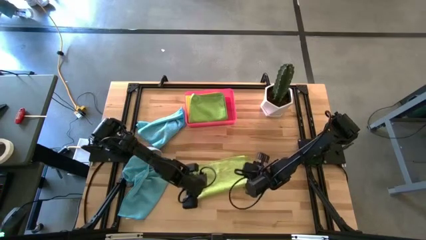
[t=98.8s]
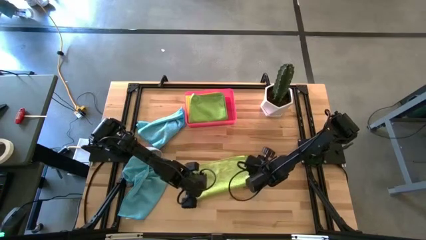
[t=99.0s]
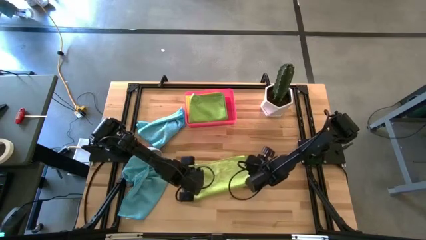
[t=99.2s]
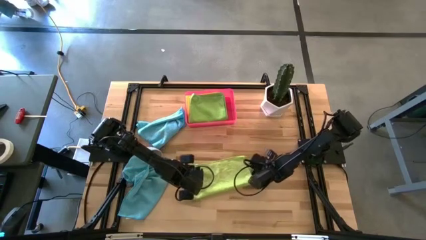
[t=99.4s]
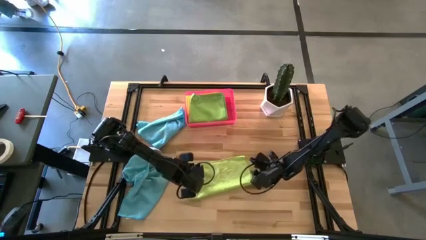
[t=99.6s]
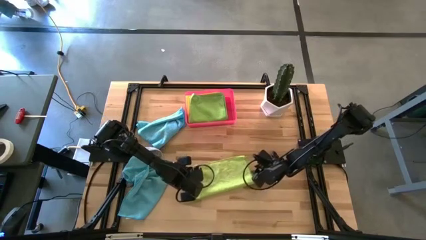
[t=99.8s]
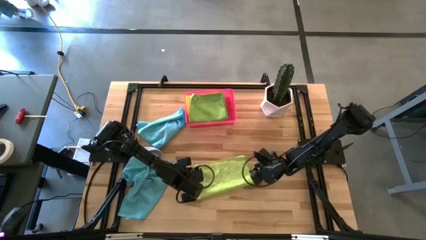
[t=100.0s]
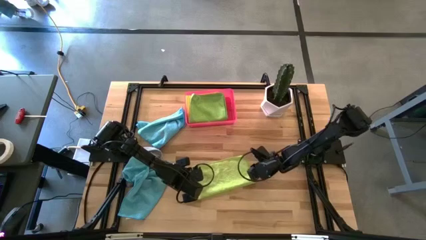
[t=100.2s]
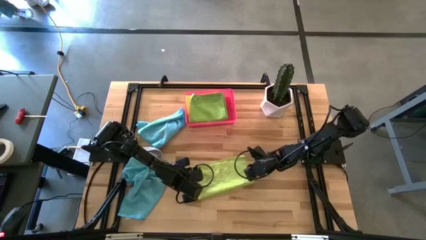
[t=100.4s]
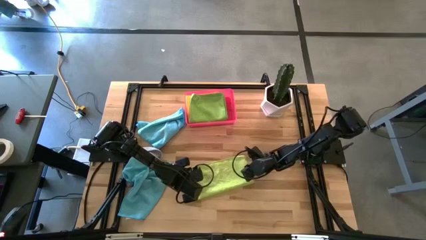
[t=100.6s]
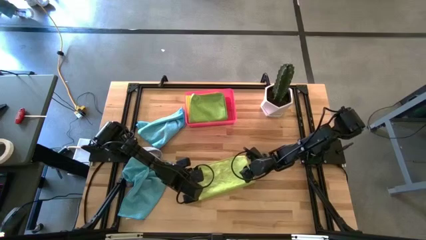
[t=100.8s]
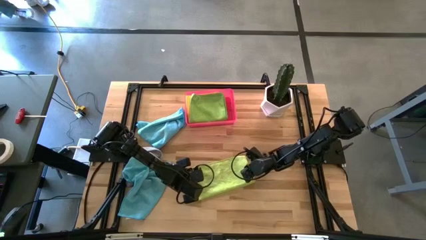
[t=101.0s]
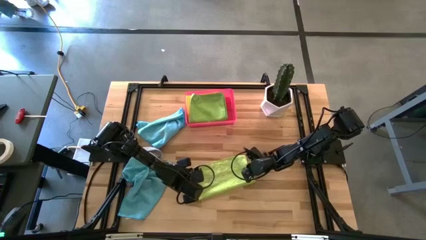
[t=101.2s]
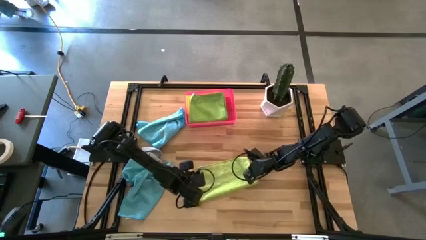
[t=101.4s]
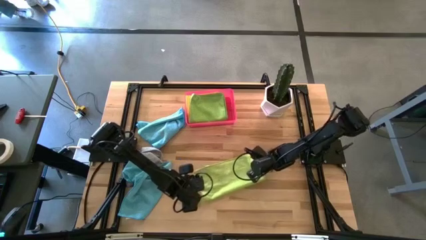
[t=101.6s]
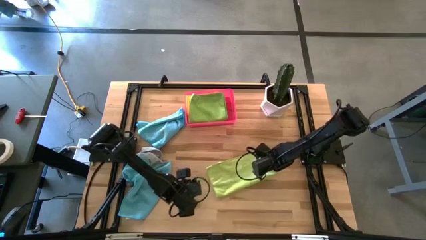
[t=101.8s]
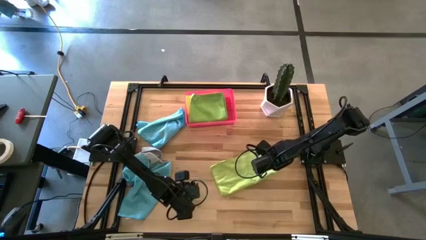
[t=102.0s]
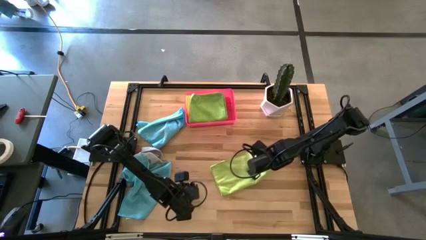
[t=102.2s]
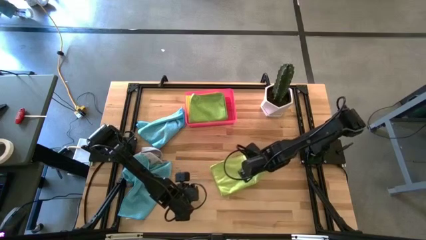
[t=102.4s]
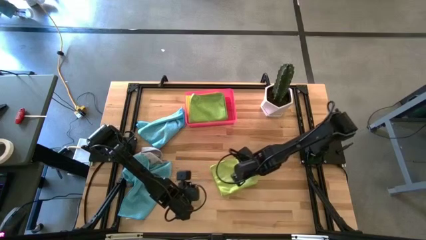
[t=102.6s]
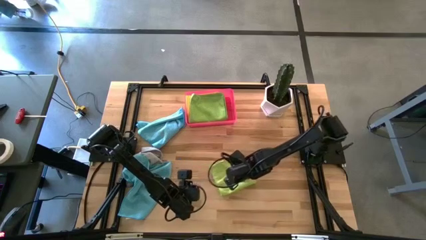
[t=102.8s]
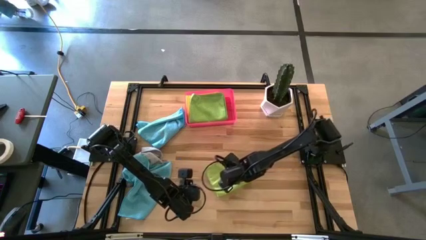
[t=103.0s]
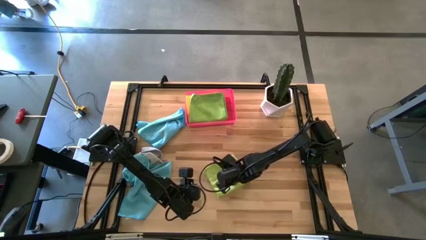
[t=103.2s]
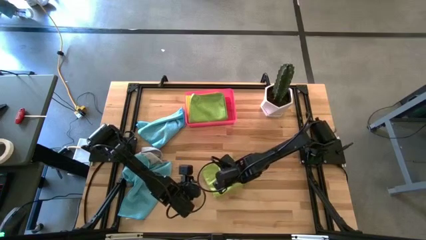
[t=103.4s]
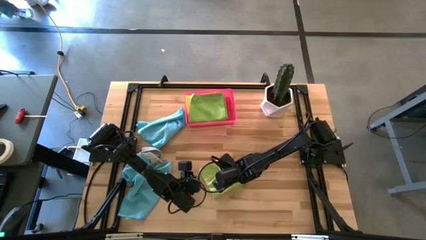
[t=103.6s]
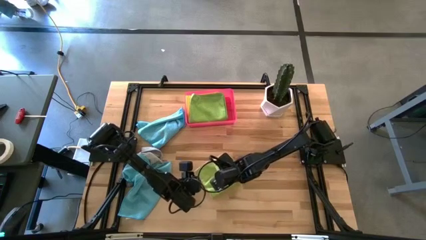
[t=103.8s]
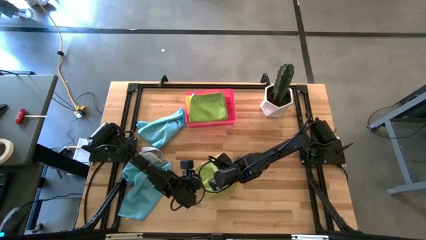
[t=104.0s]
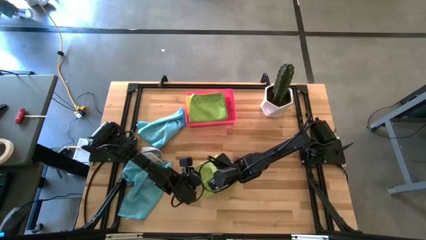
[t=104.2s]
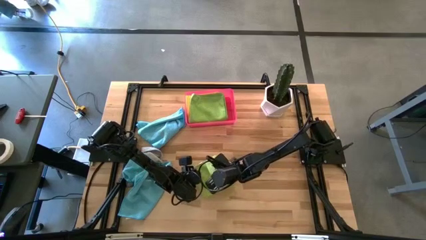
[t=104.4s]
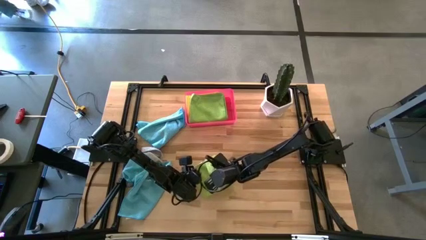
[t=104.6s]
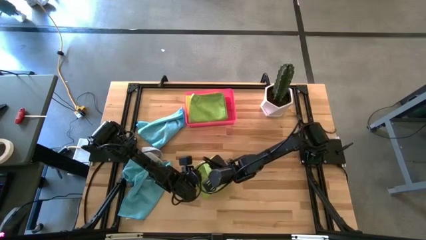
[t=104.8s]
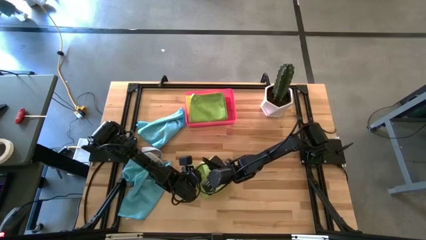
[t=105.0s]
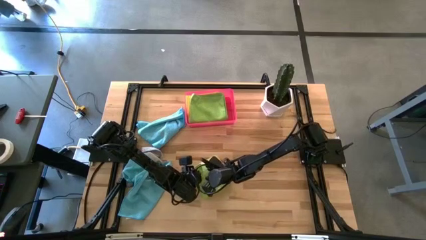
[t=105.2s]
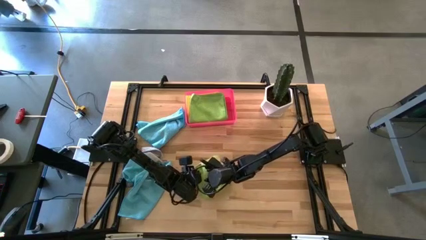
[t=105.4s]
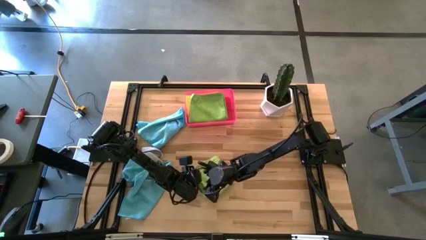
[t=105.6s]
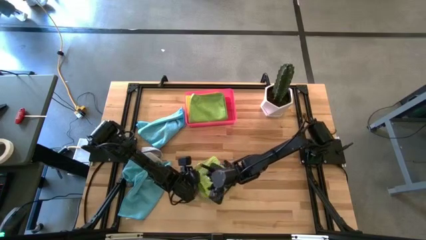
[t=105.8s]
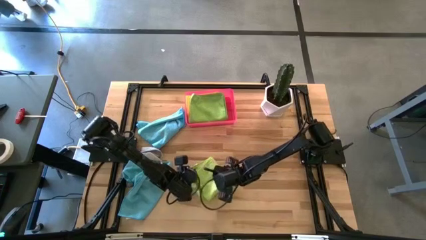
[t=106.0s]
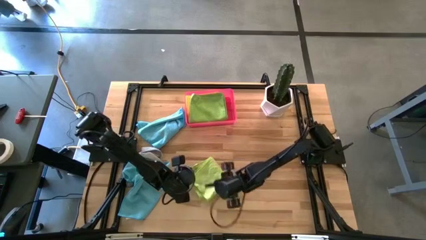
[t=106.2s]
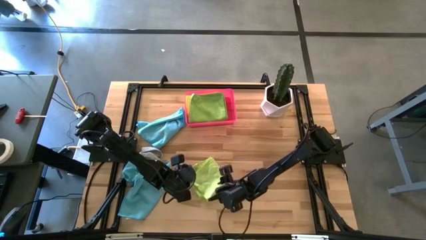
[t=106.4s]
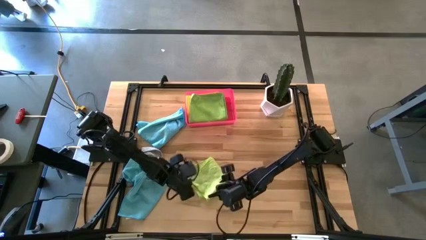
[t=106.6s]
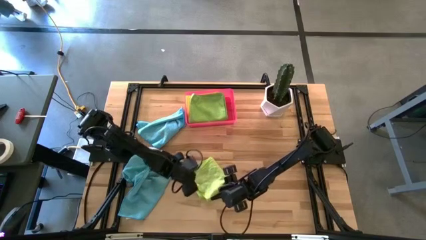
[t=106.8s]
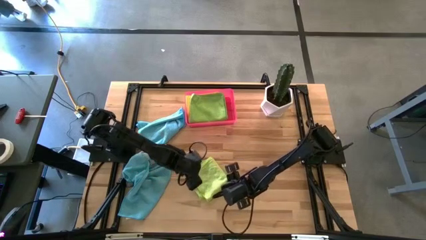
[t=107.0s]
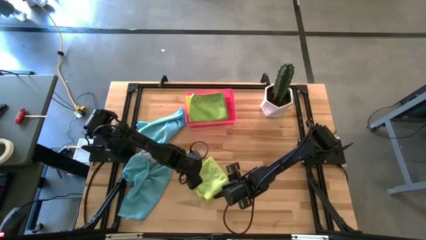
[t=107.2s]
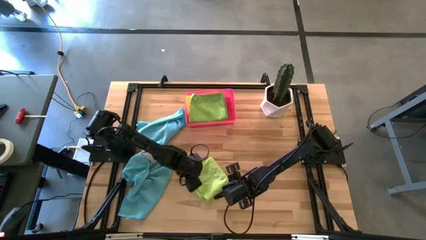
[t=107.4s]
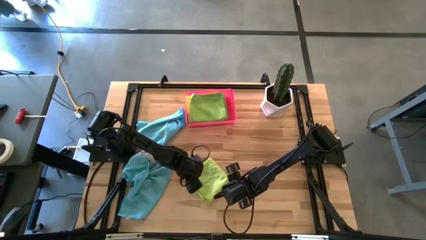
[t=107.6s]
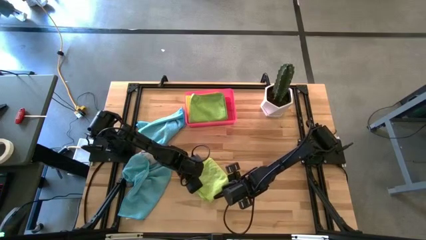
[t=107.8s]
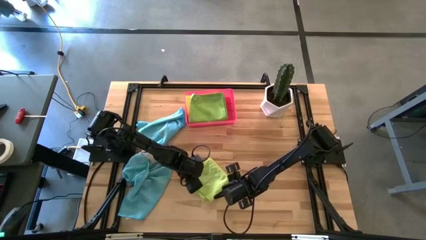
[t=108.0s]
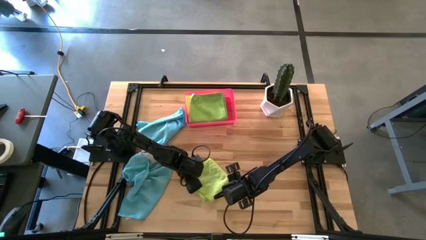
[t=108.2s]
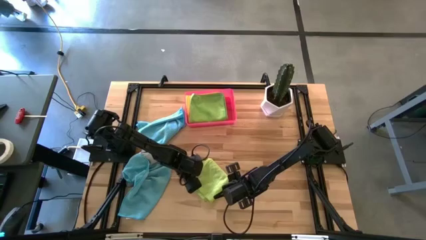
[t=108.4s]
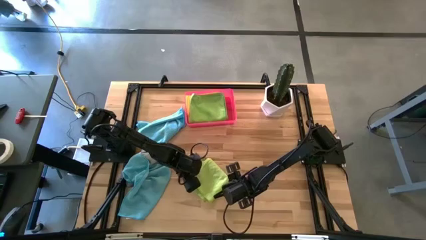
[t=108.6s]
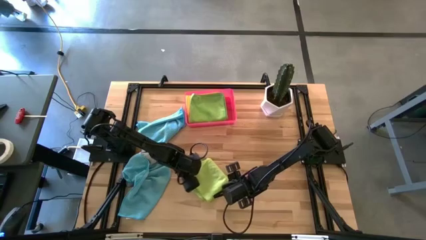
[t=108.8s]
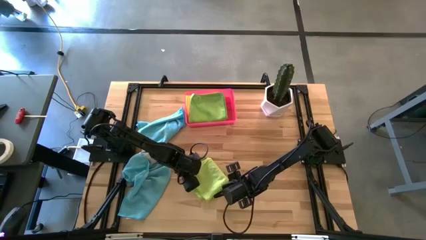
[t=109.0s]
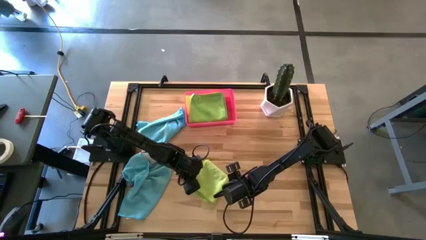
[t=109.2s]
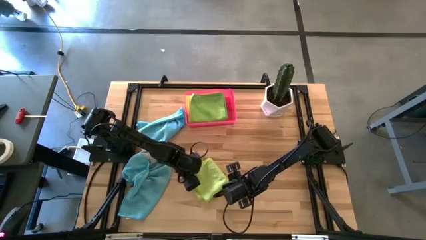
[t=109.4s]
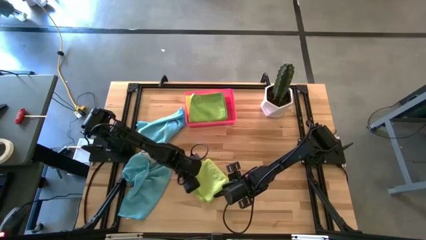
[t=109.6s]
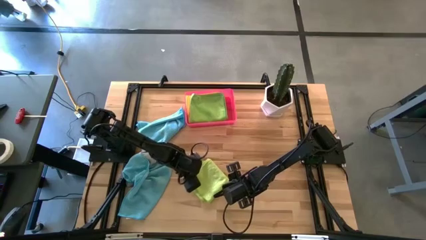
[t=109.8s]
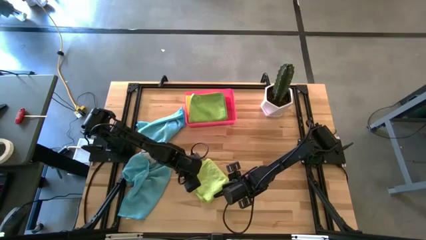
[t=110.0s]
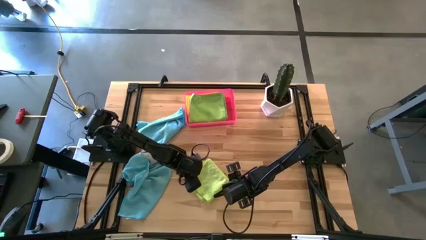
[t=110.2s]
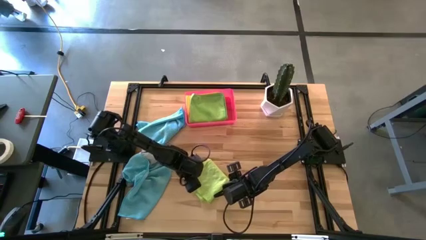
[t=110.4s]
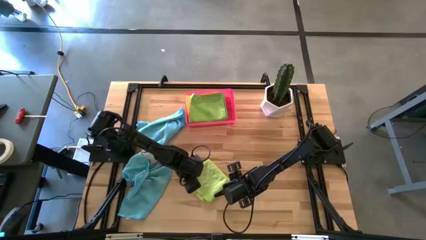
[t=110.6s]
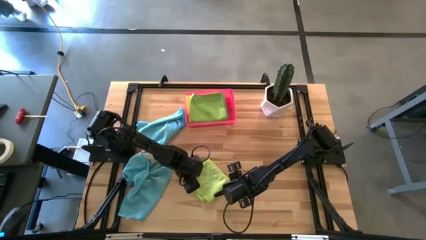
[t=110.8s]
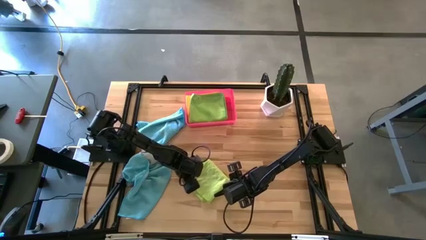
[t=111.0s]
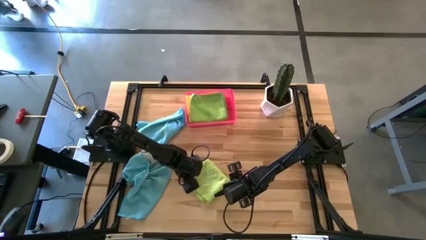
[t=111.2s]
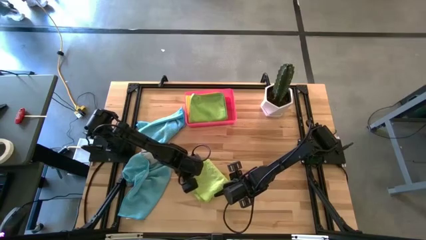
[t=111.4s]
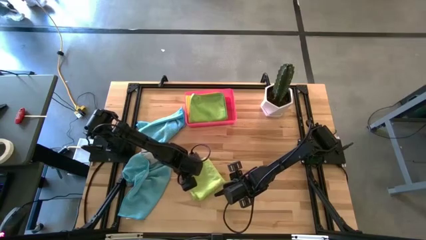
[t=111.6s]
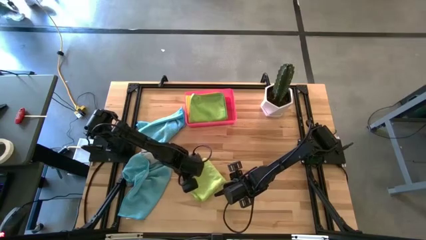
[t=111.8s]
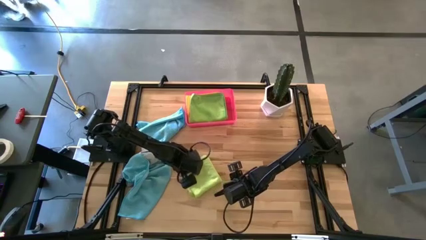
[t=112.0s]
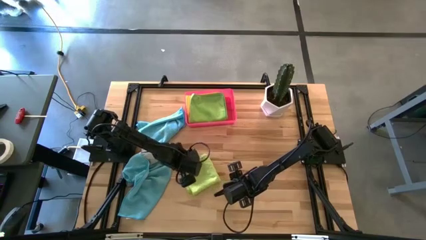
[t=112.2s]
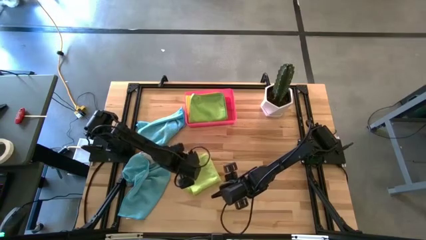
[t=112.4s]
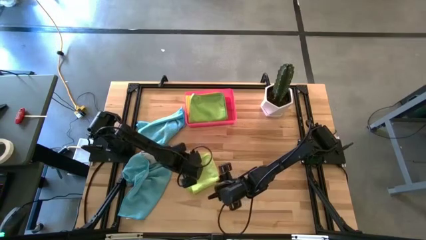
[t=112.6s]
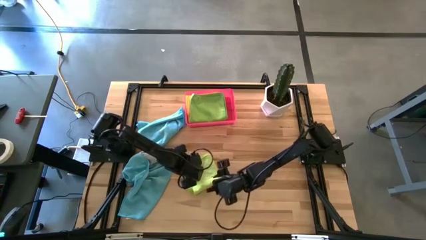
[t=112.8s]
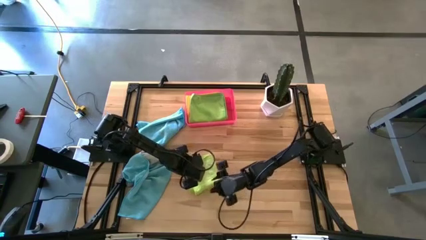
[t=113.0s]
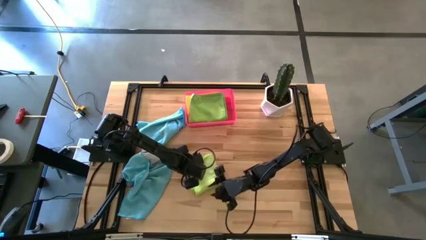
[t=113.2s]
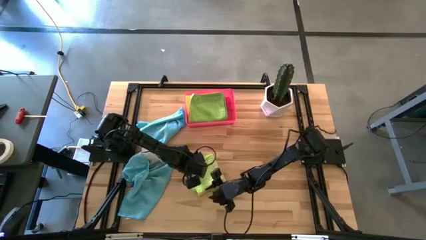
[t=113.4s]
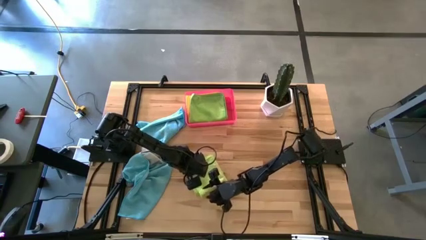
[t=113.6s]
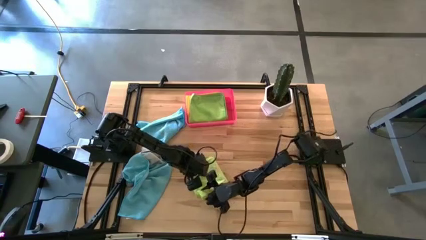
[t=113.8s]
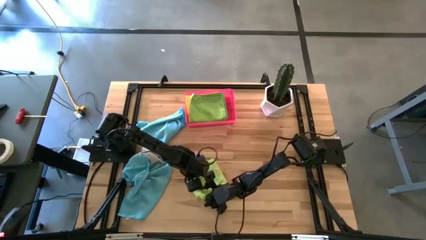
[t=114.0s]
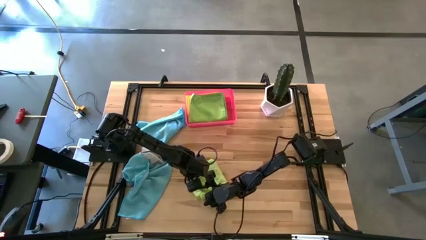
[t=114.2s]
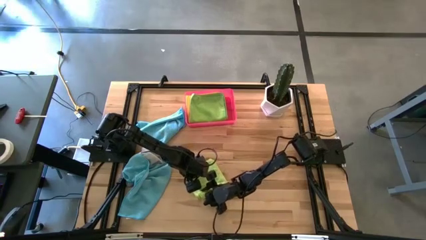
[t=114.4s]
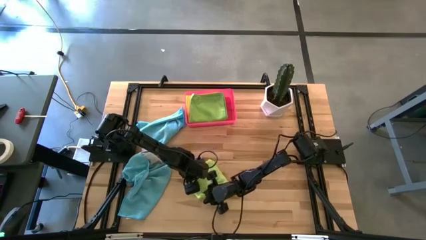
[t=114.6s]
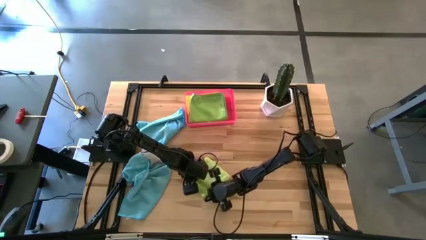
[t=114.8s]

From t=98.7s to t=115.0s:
Task: Fold microfiber towels
Fold the light green microfiber cloth
